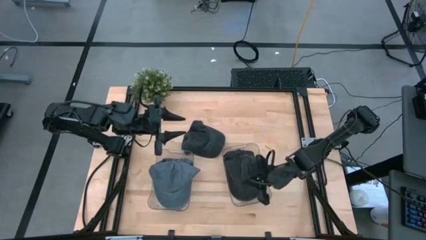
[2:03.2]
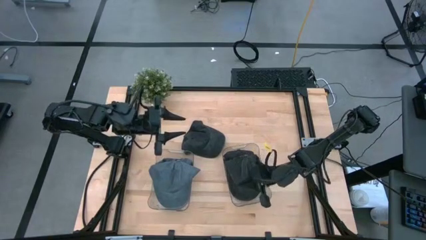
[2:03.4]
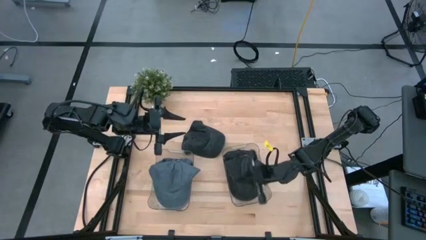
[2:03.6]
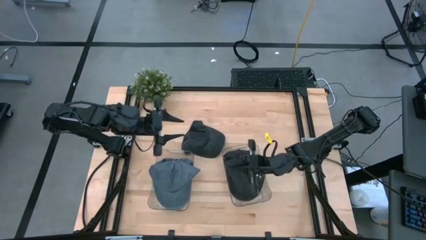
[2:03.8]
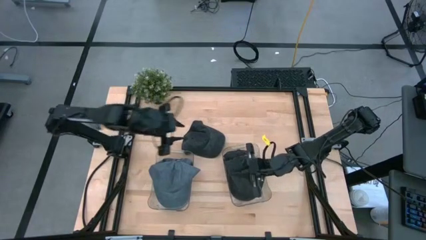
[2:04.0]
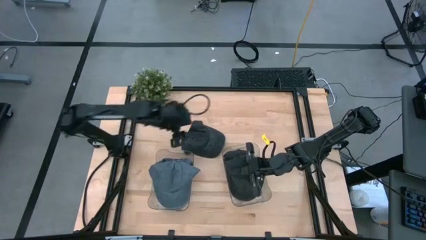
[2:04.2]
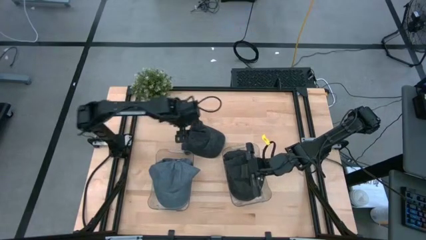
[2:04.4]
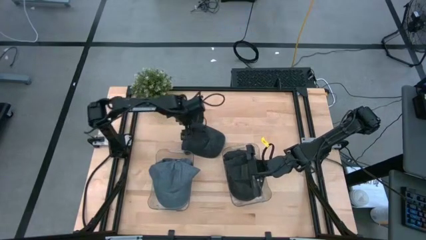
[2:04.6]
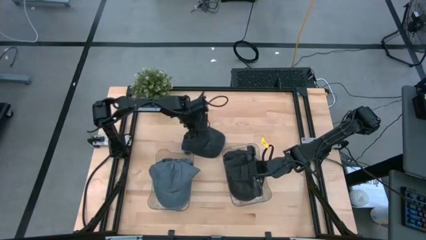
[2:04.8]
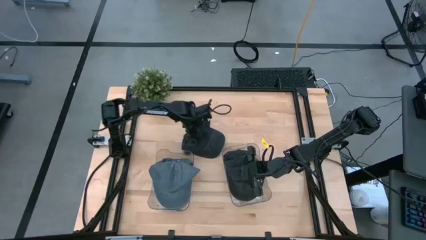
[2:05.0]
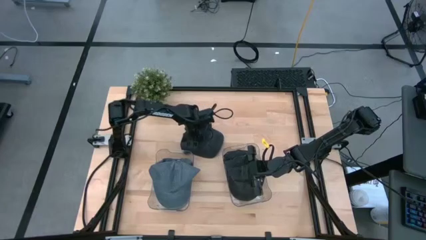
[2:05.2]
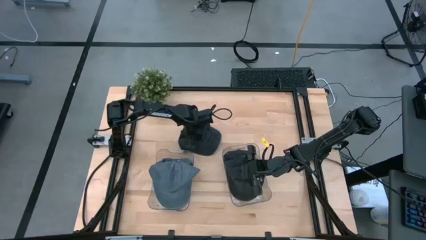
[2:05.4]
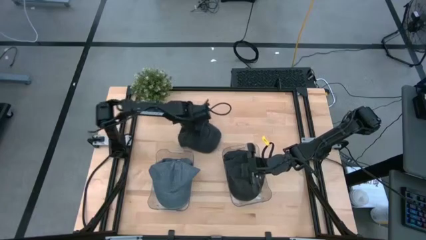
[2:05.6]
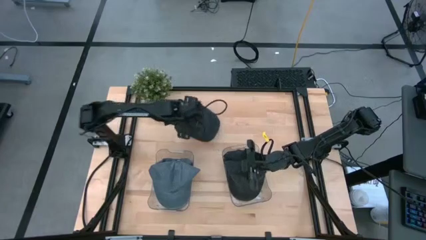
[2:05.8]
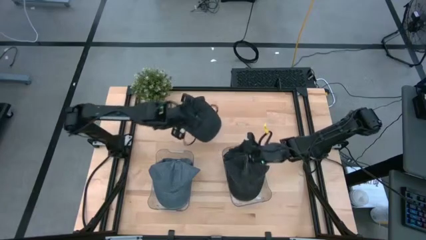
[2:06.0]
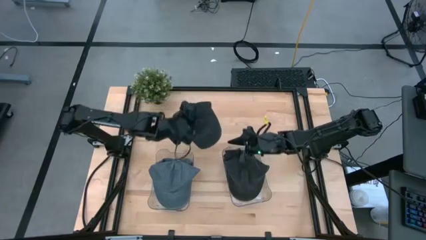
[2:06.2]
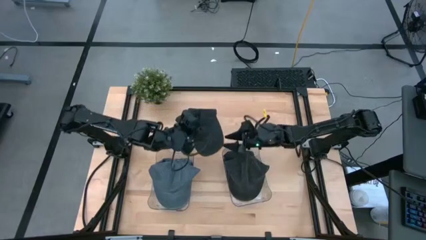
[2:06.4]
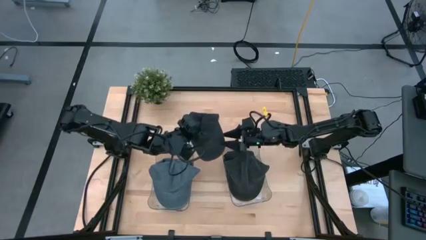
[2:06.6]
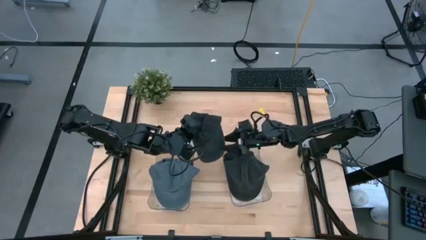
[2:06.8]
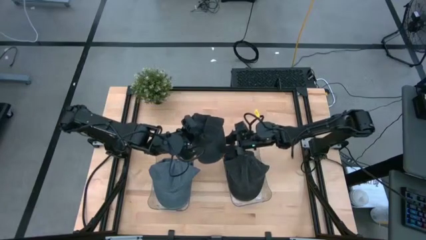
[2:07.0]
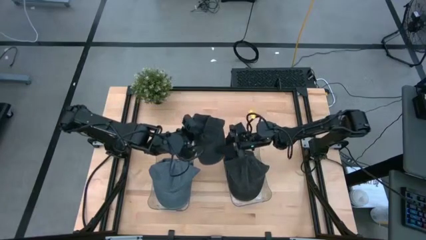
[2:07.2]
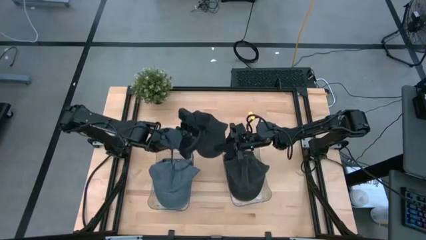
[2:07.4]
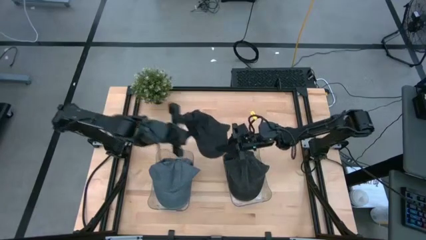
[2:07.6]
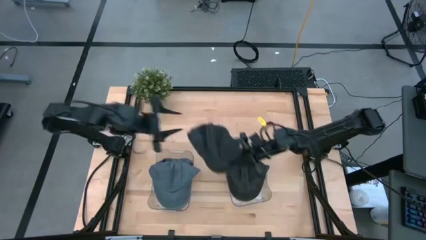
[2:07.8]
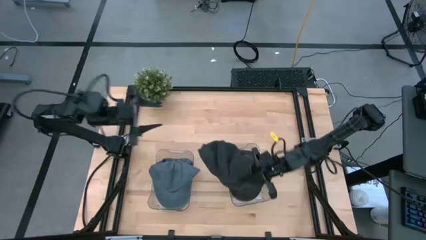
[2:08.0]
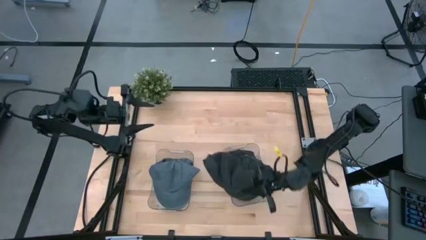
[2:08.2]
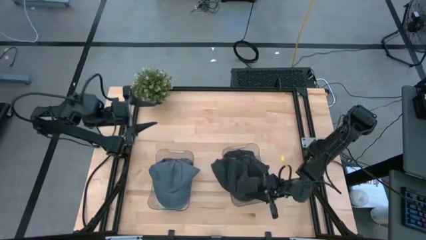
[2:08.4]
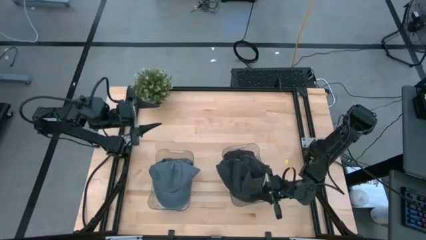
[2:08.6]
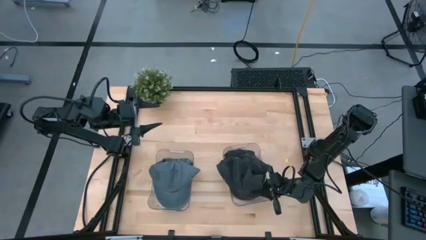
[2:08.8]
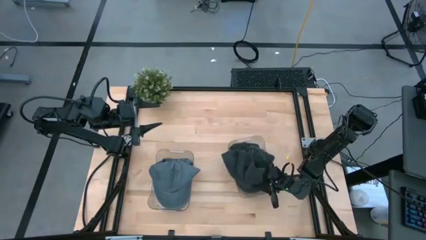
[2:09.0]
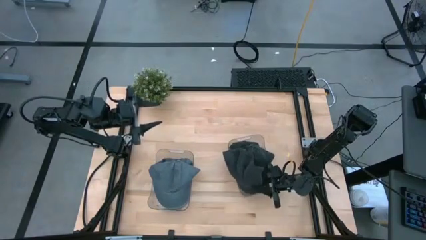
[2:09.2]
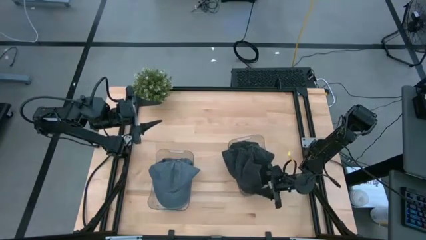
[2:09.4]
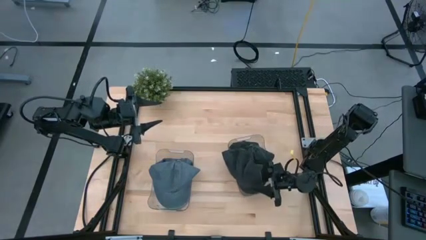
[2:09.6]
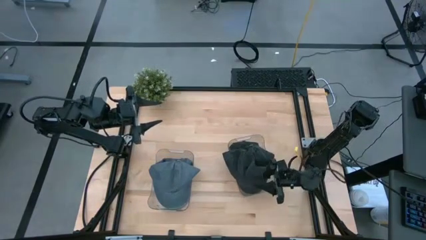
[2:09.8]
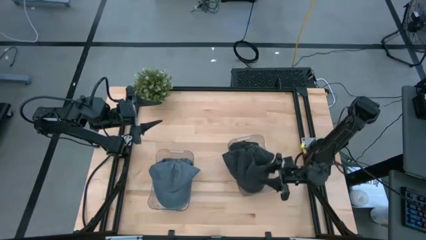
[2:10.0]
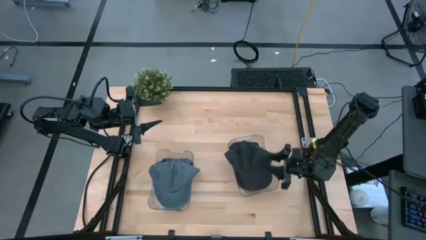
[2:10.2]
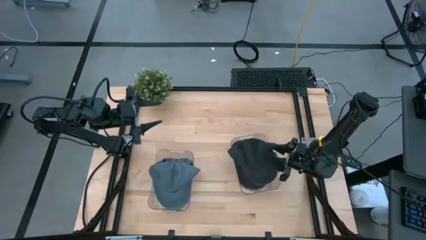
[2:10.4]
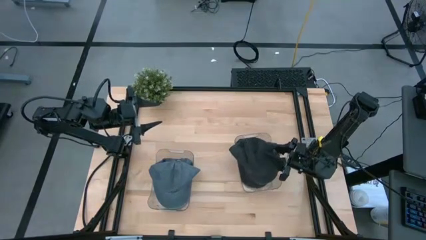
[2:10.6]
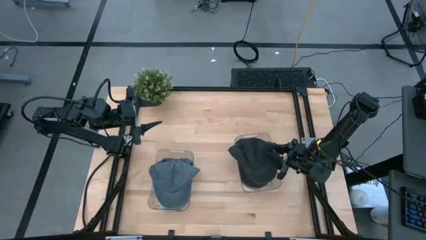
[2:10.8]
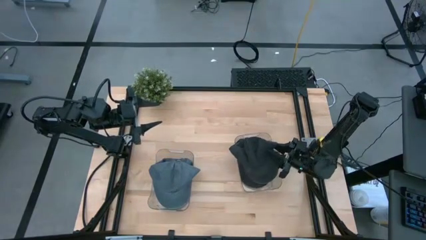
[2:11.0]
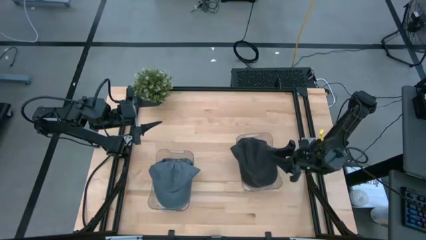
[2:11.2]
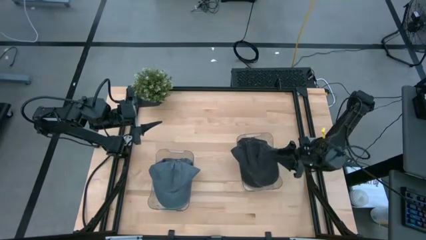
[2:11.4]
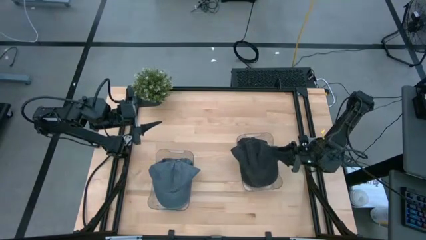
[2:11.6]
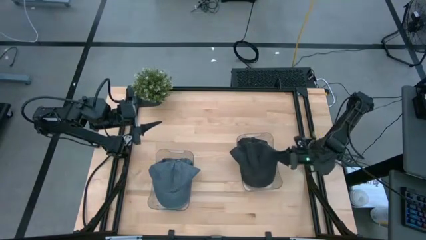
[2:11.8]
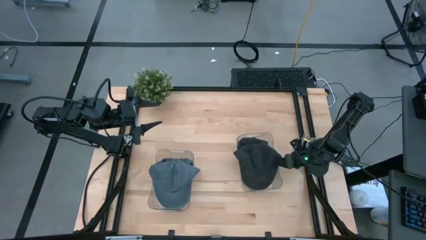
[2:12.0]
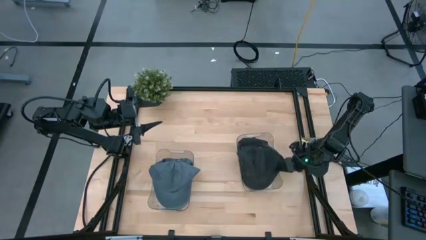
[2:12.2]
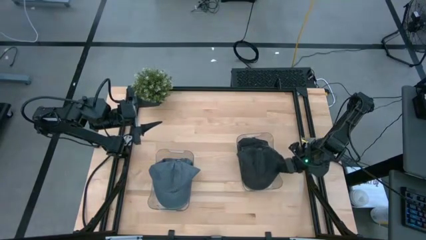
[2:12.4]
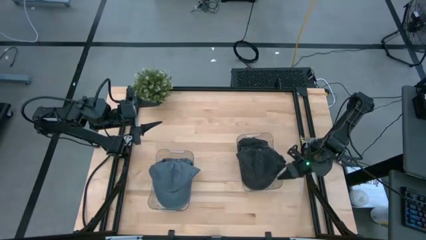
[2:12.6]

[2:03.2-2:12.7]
Task: Pick & Place hat
Put the black cap into the right transparent bin

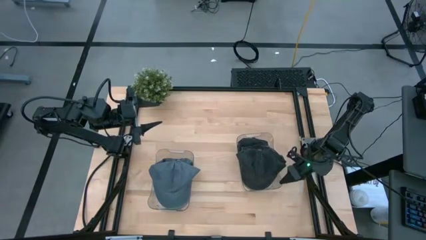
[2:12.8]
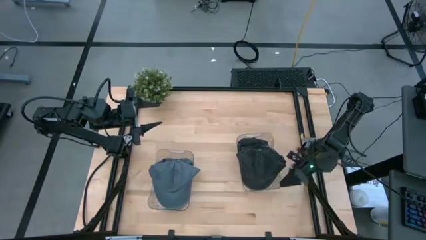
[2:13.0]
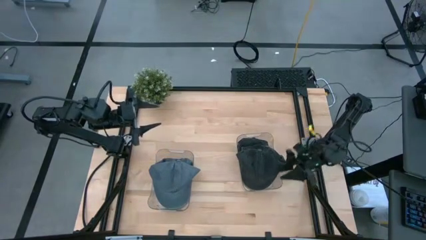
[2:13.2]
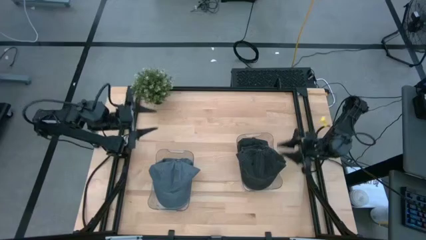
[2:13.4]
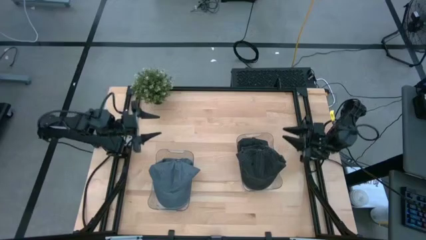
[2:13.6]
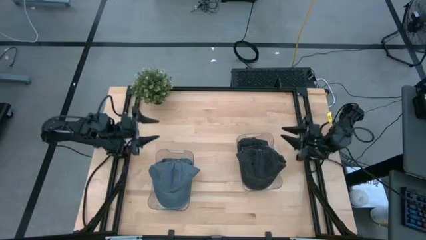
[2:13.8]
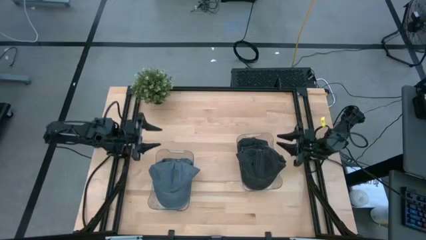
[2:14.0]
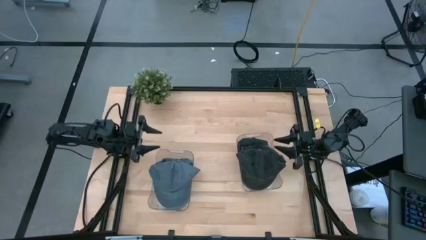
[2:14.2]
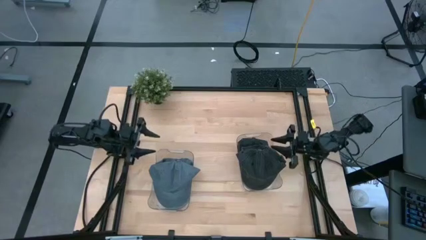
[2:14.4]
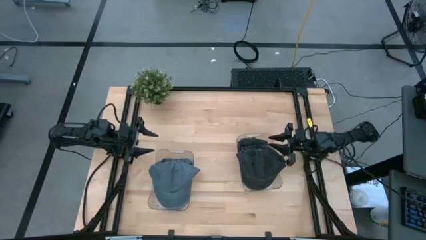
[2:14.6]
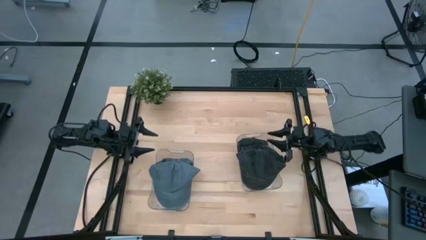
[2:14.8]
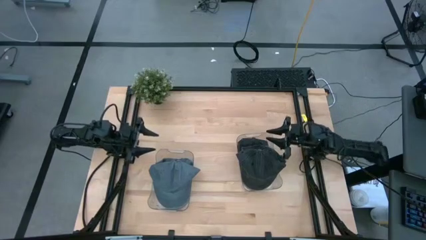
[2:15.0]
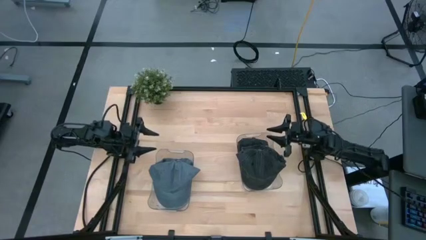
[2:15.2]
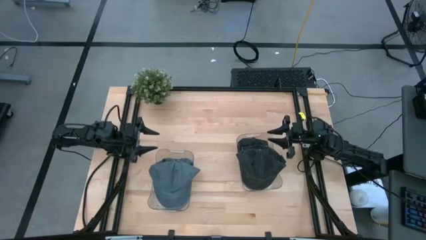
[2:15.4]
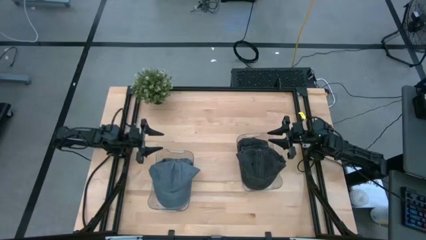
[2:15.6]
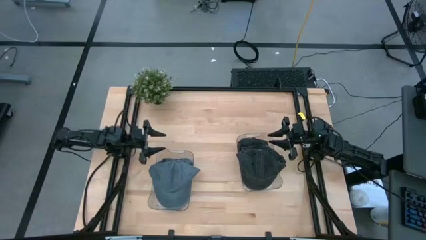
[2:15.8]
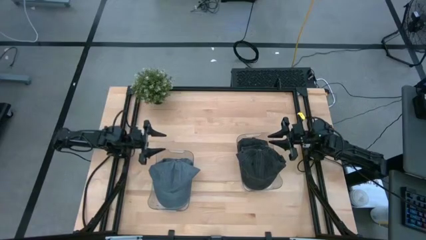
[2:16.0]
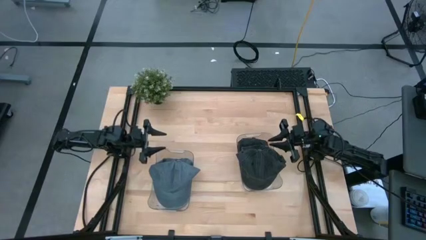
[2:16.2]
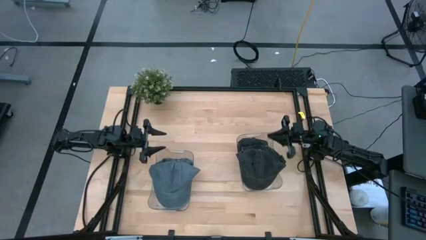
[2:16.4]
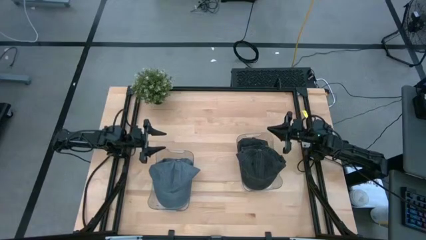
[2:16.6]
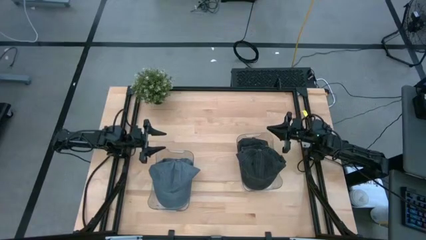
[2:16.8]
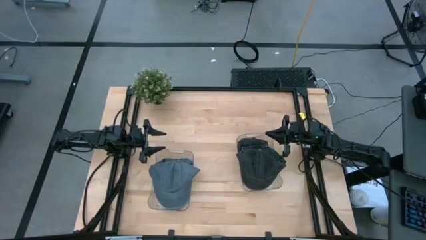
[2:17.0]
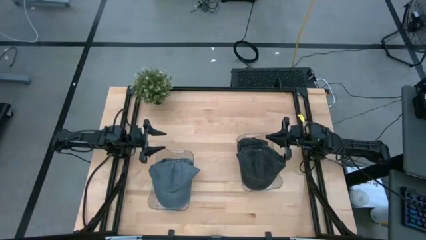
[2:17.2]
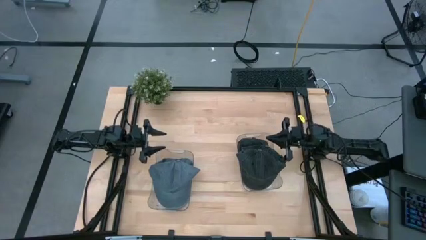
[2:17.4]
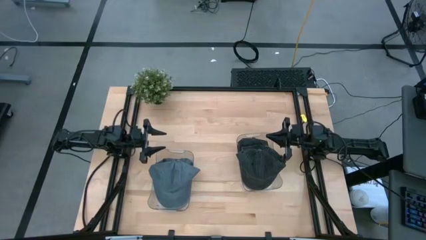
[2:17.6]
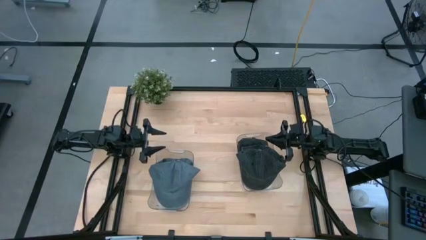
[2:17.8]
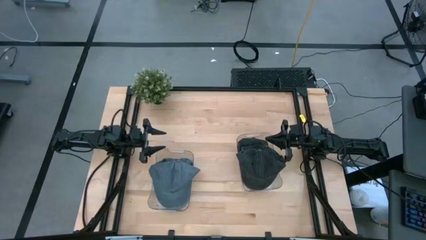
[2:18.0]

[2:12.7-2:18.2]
Return to Home Position

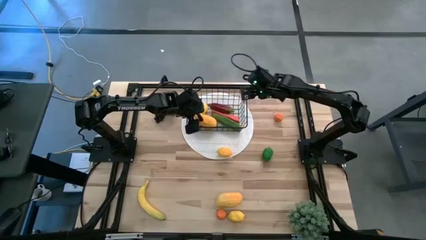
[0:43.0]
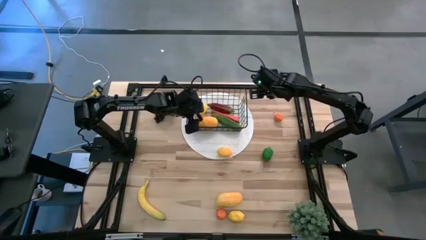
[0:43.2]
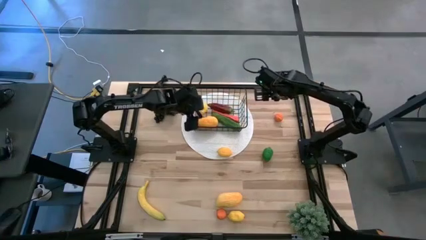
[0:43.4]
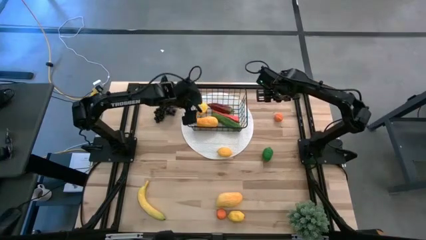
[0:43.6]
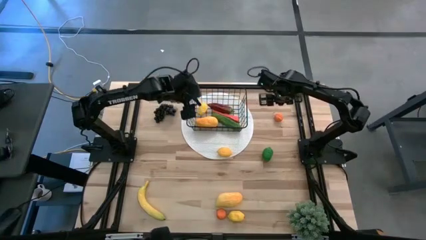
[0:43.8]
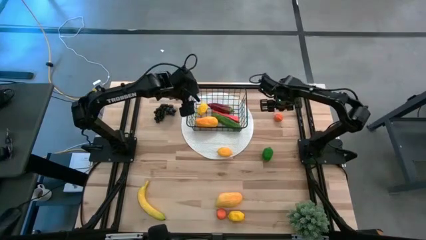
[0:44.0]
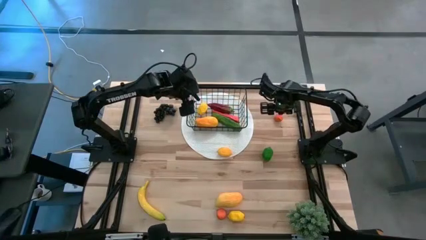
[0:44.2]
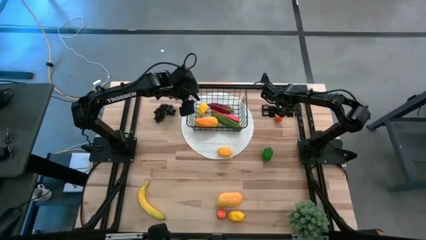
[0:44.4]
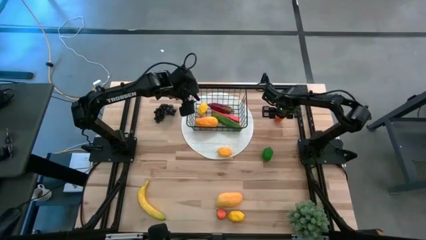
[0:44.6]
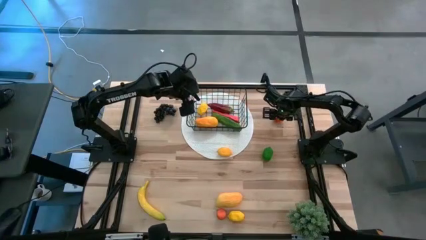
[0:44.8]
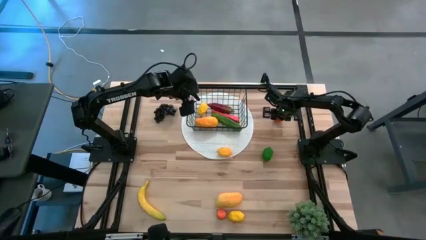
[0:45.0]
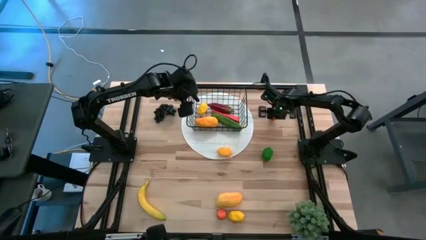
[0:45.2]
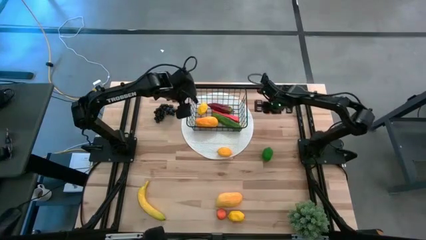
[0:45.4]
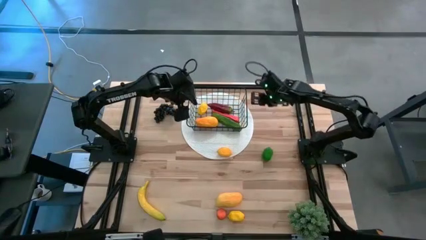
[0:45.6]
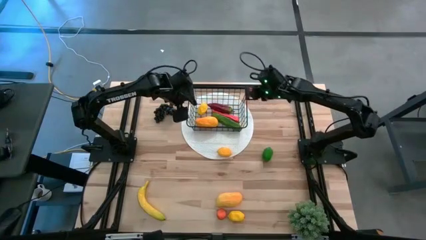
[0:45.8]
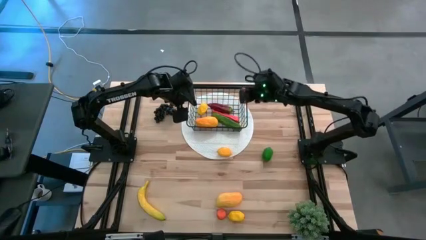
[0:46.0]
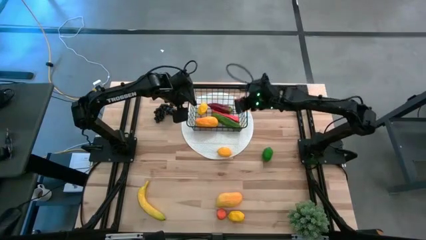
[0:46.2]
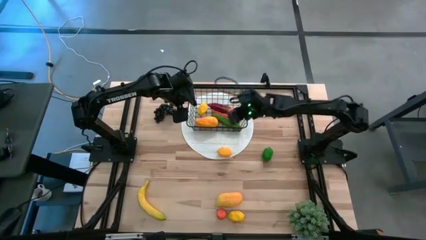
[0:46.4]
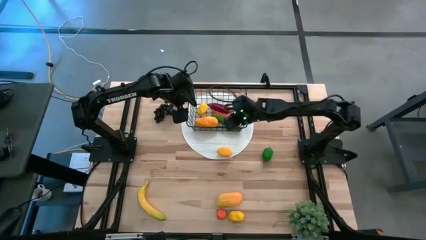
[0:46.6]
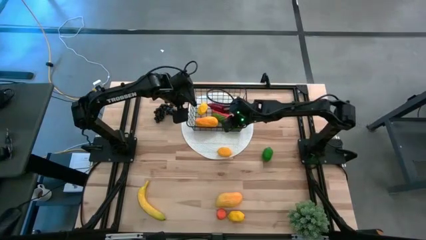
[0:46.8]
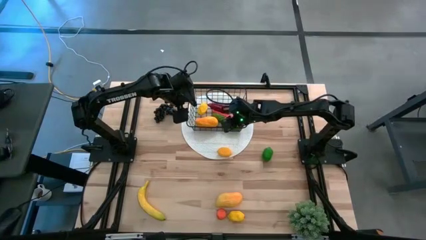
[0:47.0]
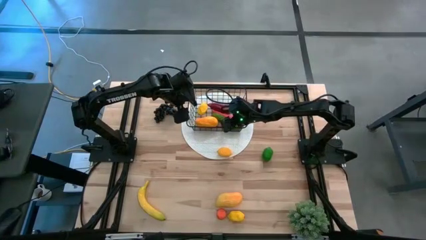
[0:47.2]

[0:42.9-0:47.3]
Task: Build produce basket
Put the top orange into the black wire basket
